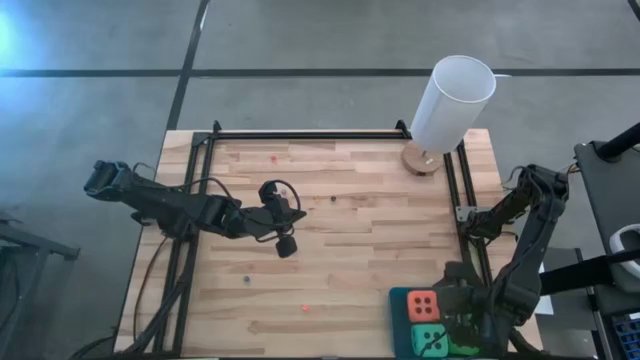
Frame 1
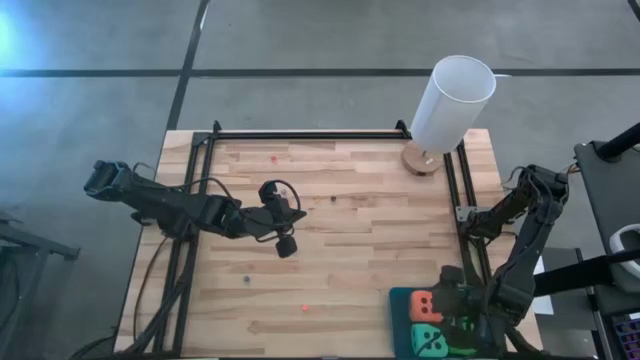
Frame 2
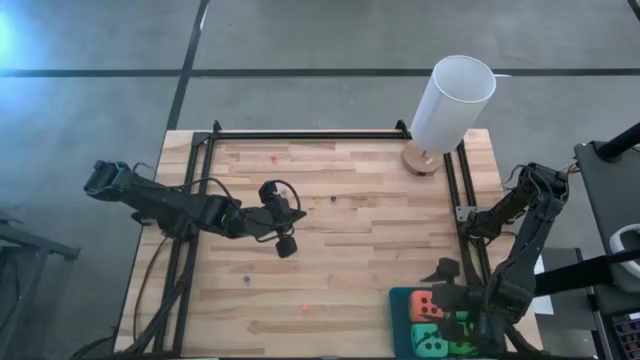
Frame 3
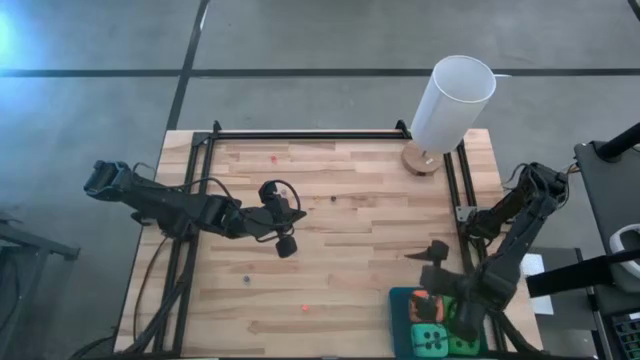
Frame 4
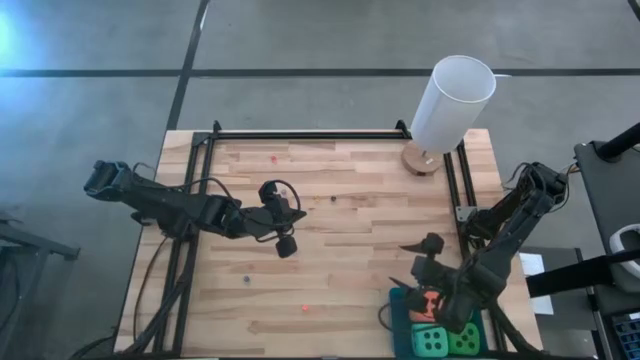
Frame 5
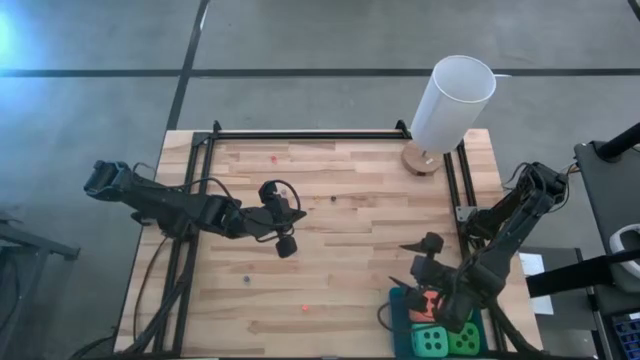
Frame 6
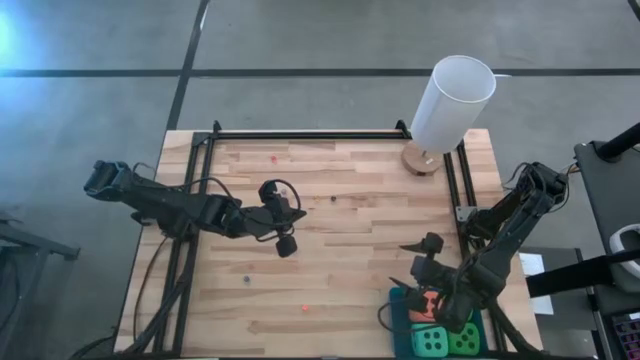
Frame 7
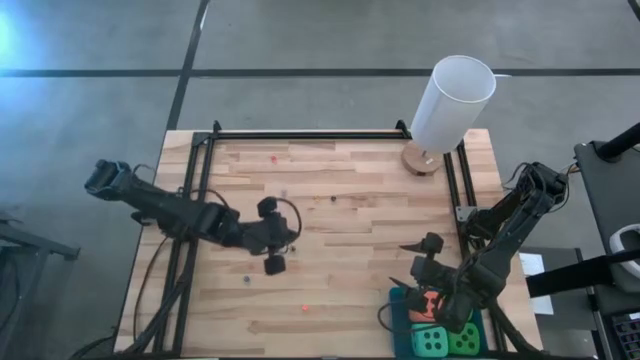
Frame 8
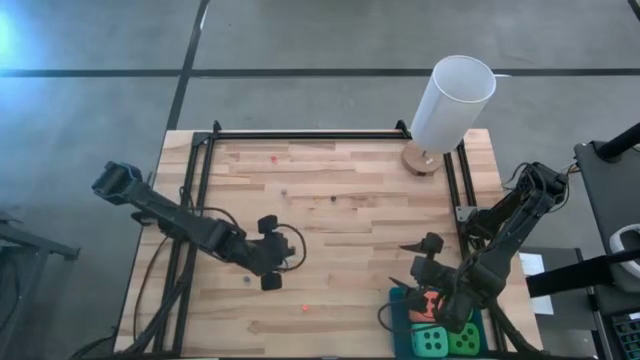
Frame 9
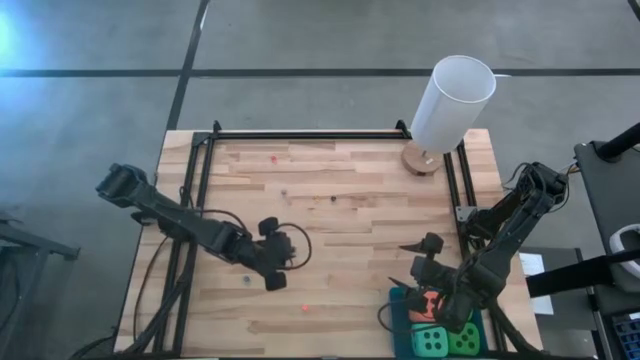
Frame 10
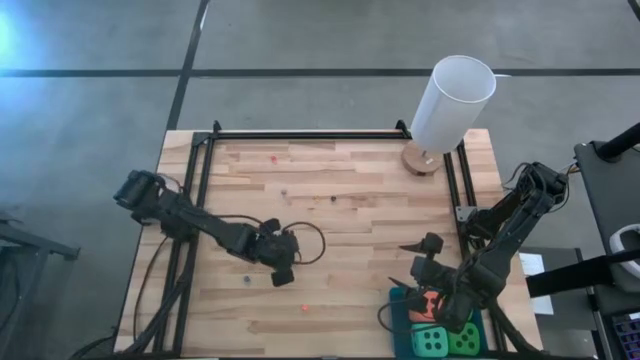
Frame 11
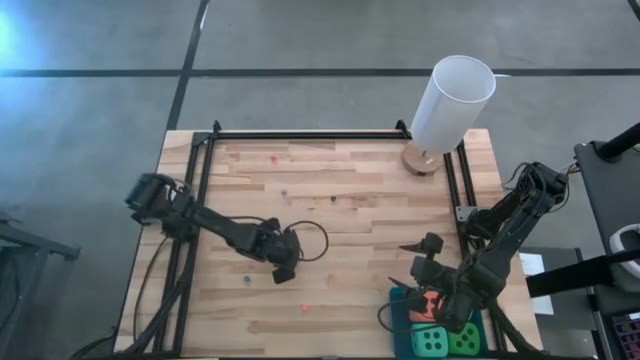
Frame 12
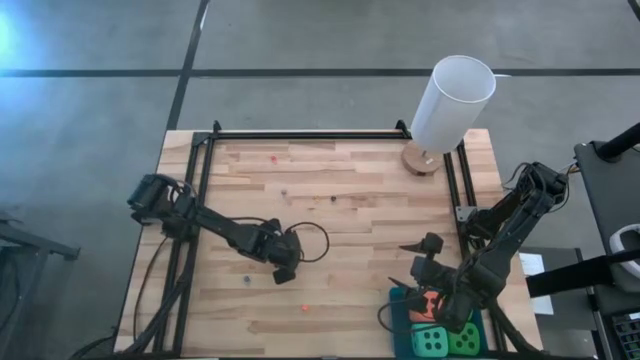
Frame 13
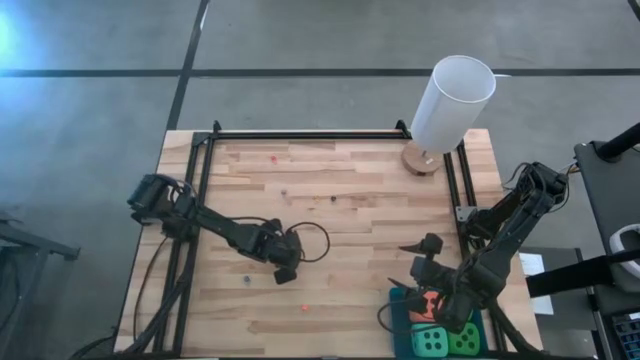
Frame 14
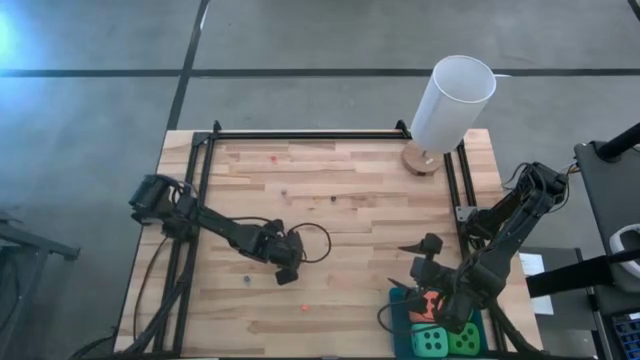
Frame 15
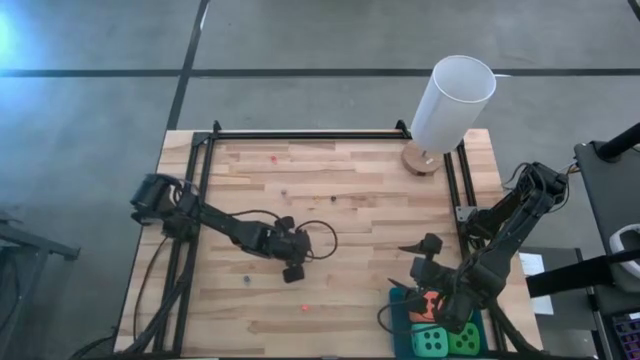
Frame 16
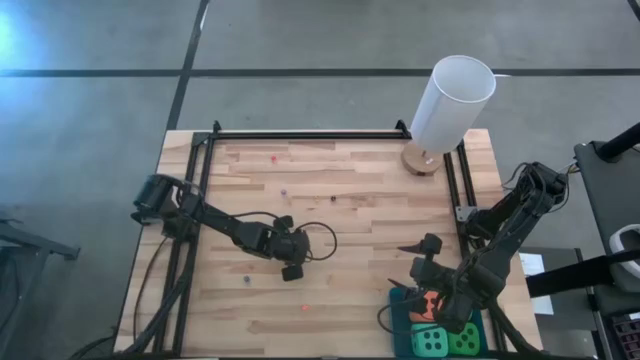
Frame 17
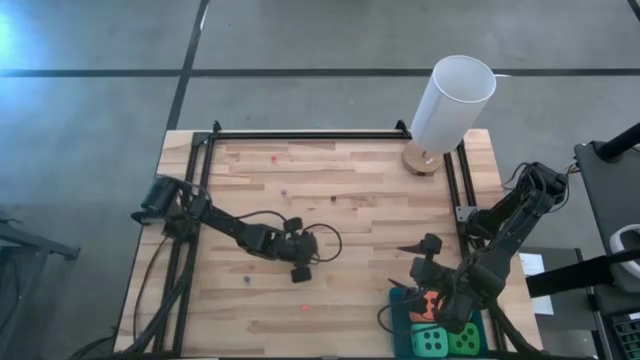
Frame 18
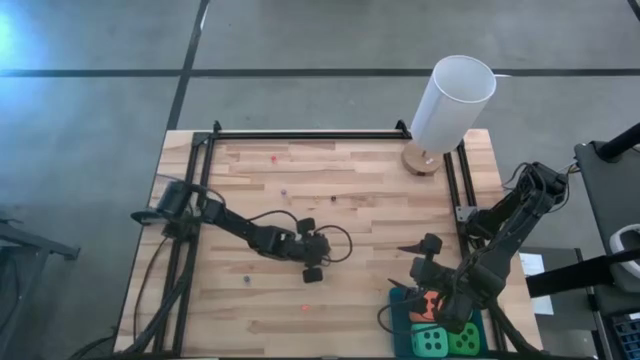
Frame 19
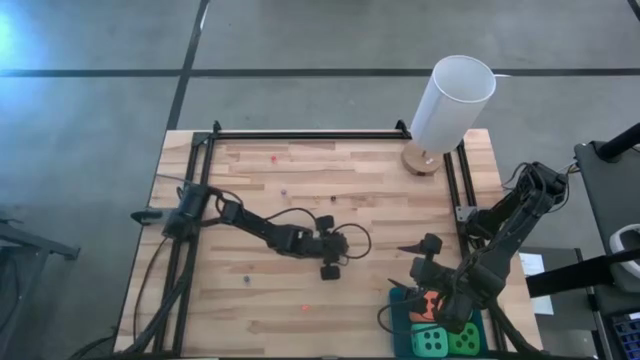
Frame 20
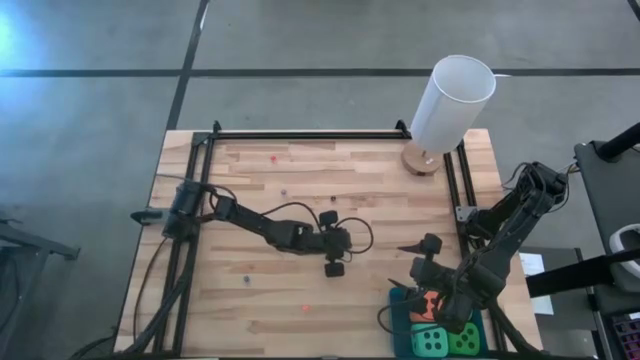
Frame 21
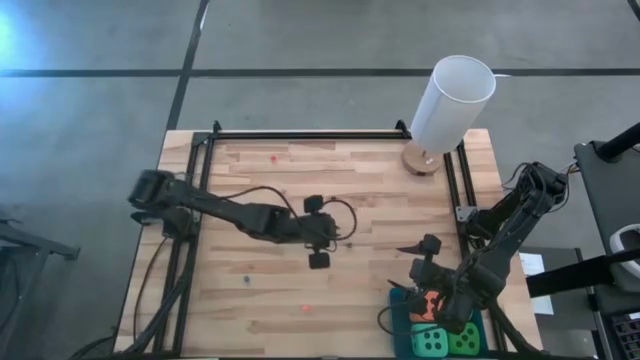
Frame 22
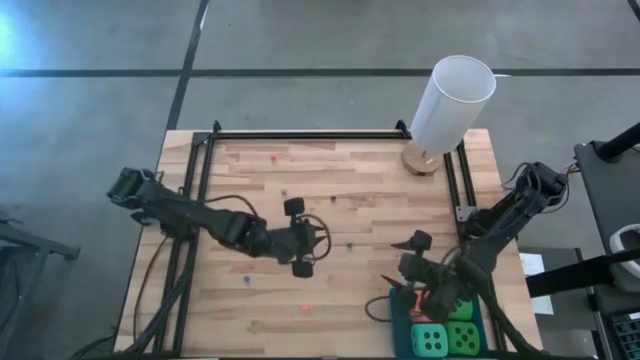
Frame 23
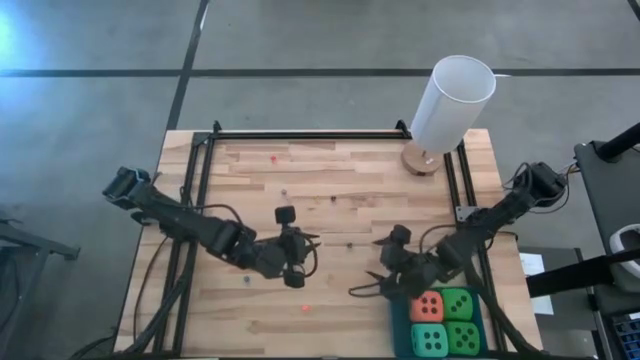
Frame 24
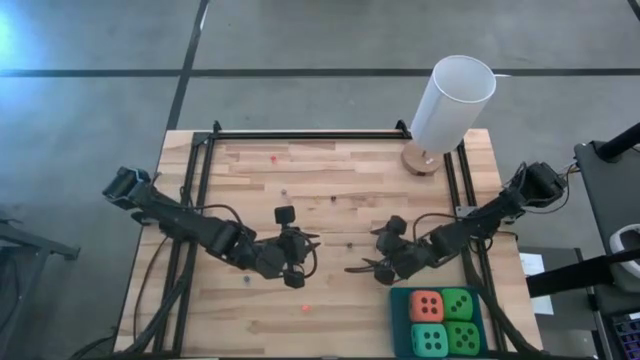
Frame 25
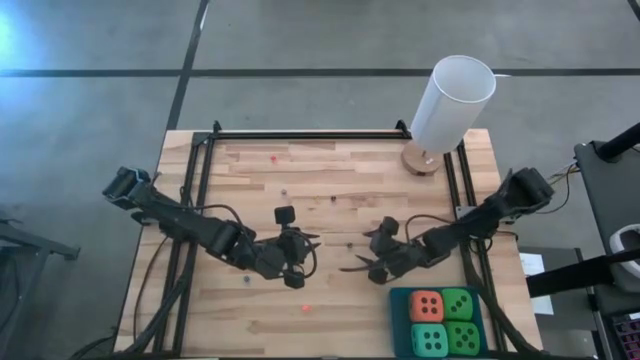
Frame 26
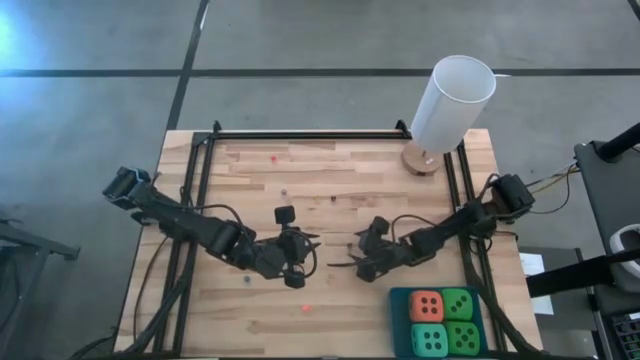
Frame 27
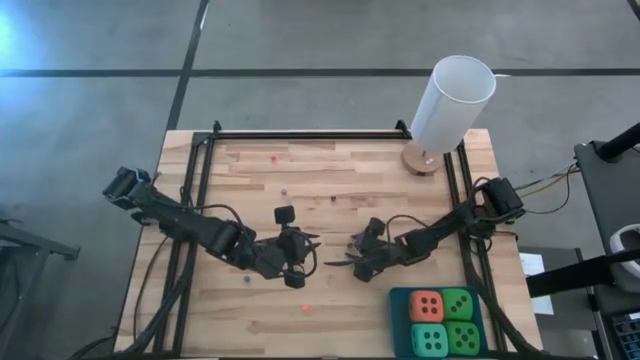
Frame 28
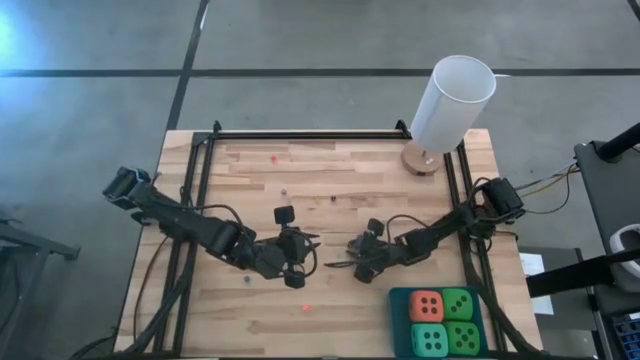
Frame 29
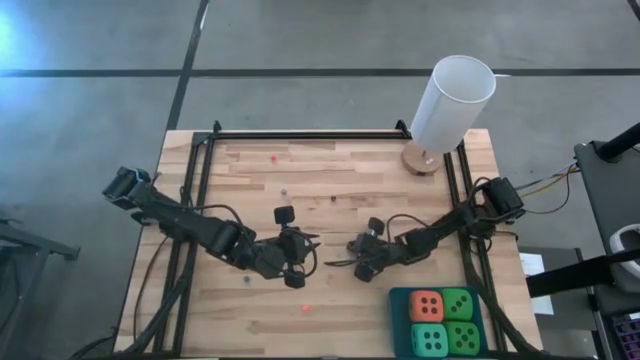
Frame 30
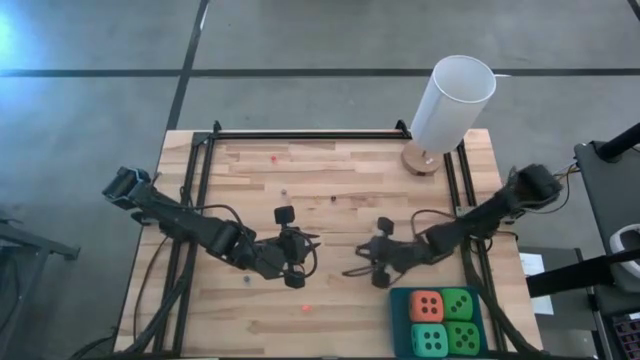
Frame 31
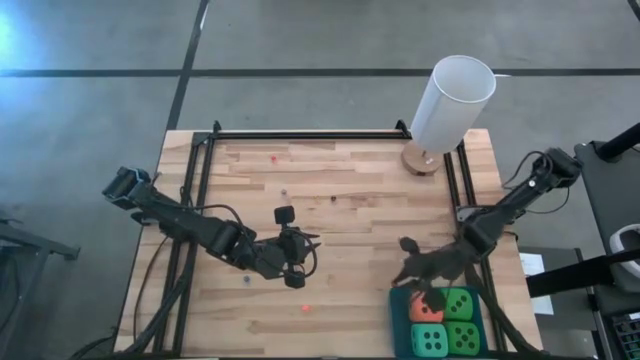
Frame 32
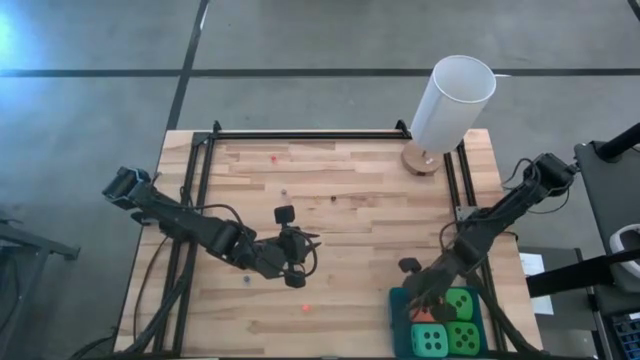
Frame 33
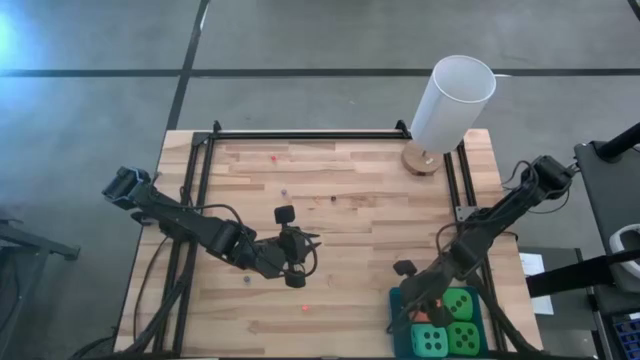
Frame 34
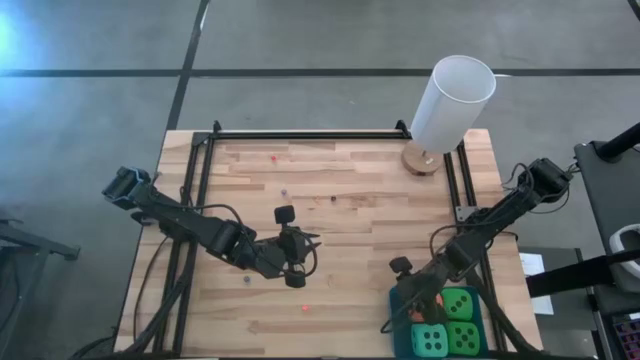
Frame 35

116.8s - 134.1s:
Task: Pick & Place Dice
Put the bottom small black die into the blue bin

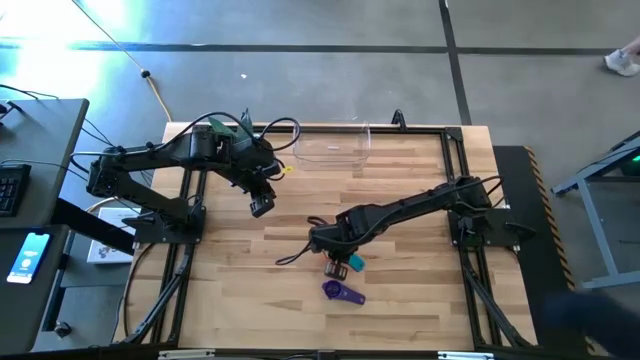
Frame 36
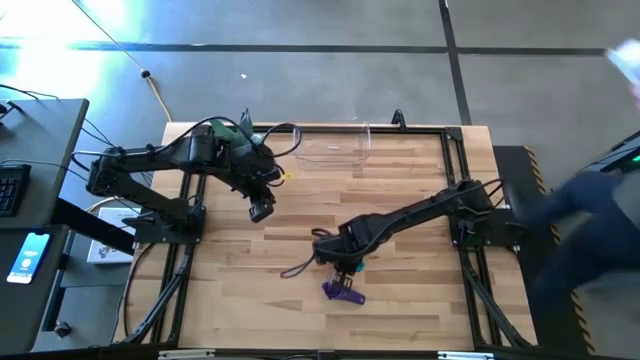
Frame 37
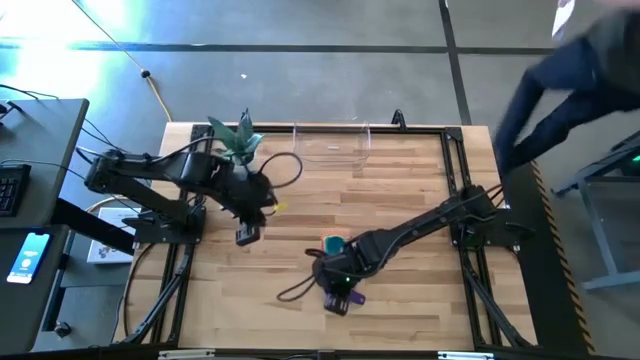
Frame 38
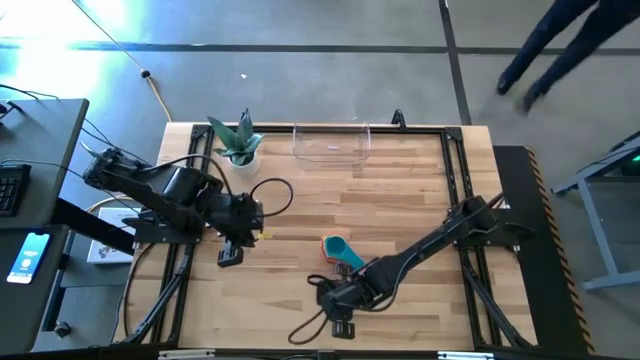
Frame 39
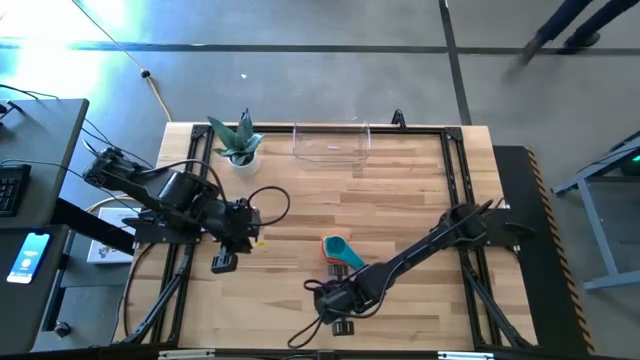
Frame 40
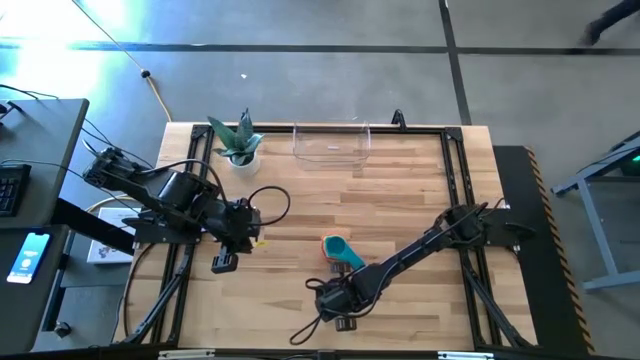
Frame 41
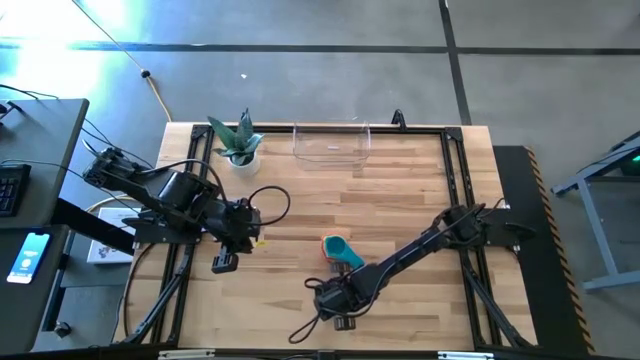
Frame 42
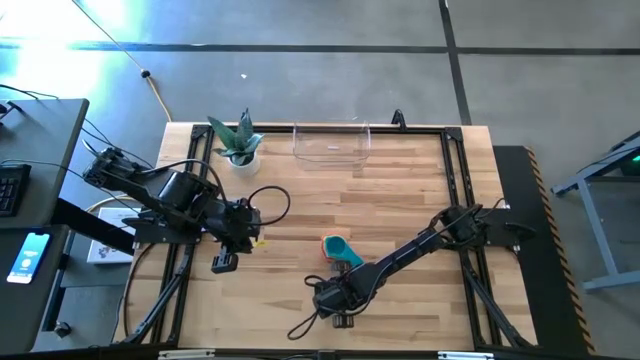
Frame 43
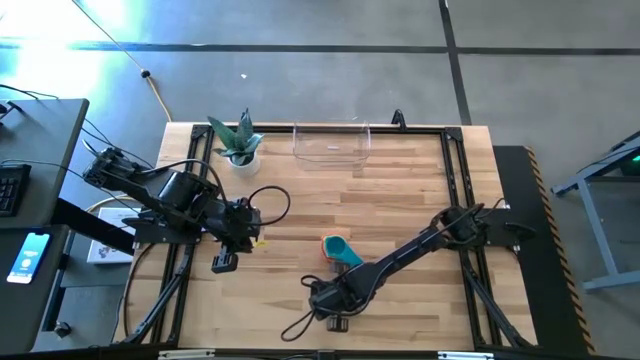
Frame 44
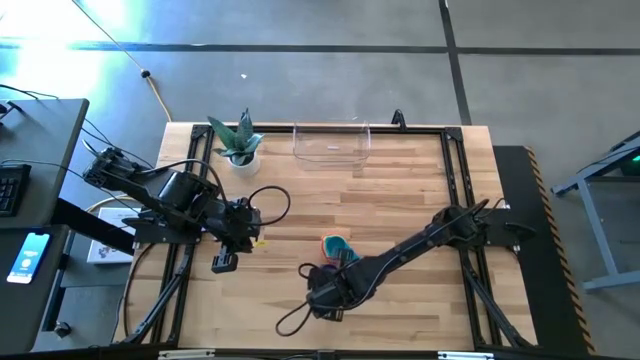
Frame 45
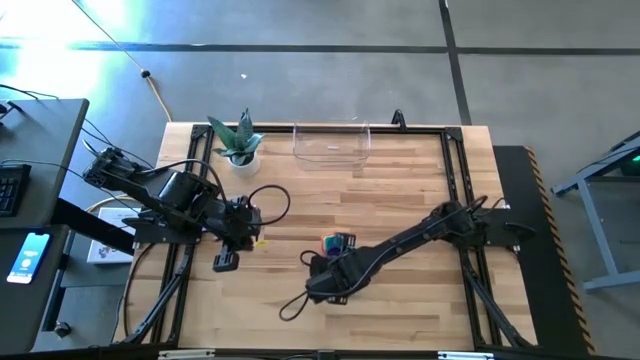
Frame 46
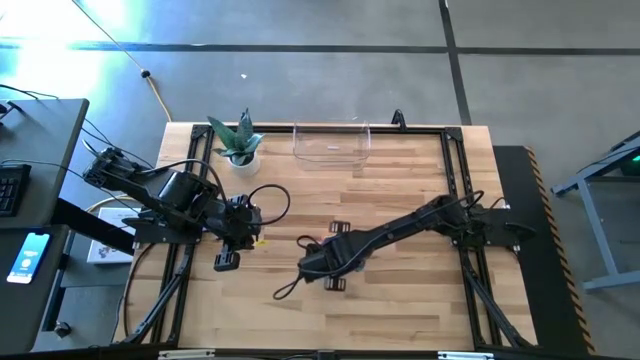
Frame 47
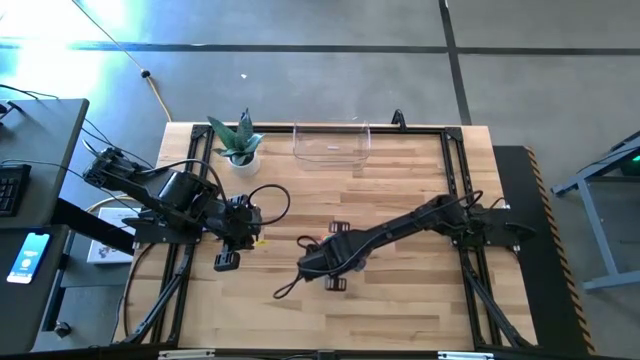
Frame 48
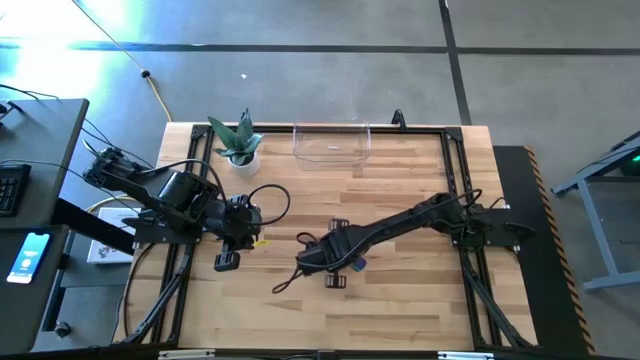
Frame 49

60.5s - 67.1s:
Task: Nest measuring cups in basket
Stack the dark blue measuring cup on top of the light blue measuring cup
